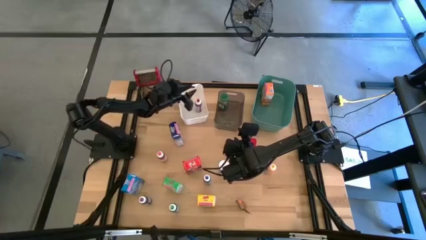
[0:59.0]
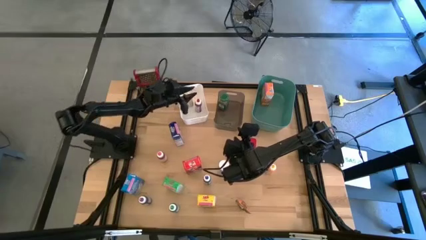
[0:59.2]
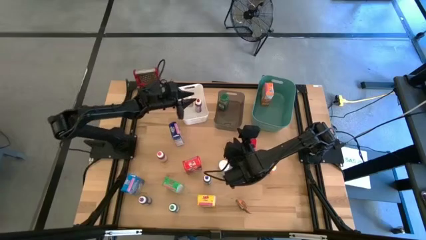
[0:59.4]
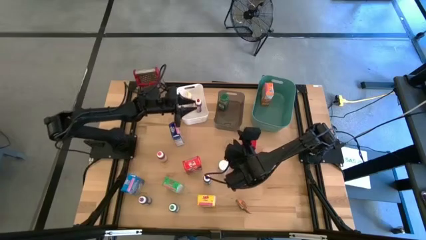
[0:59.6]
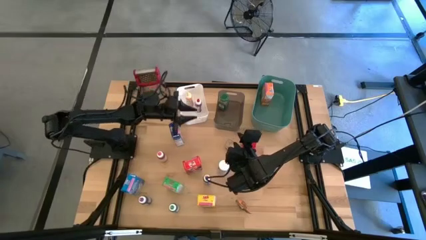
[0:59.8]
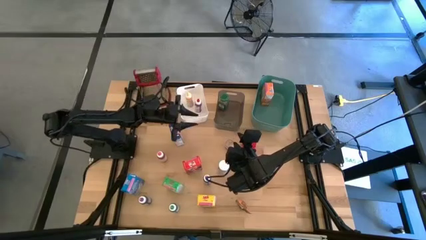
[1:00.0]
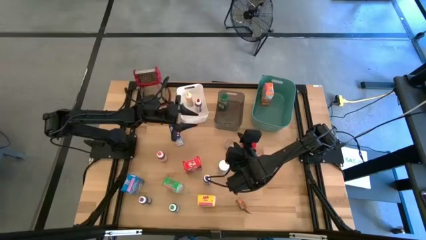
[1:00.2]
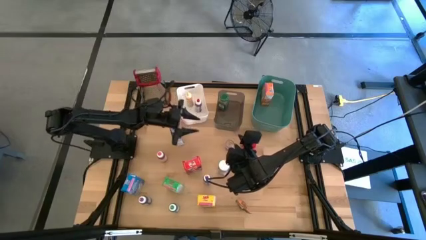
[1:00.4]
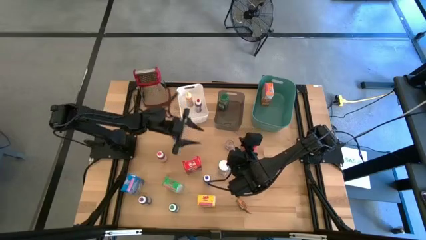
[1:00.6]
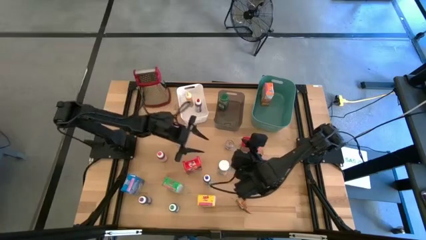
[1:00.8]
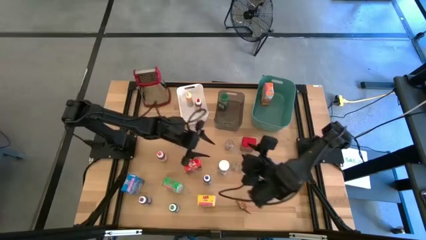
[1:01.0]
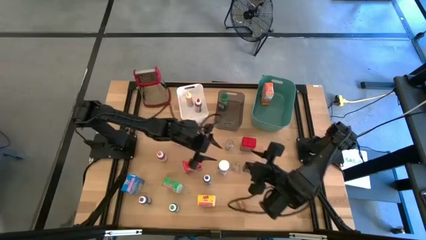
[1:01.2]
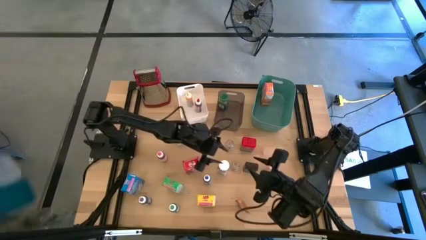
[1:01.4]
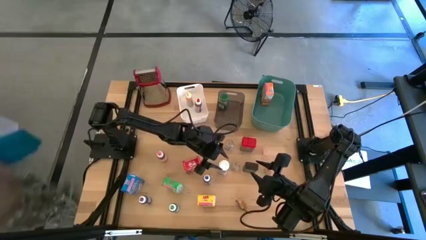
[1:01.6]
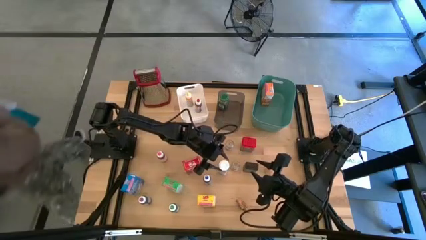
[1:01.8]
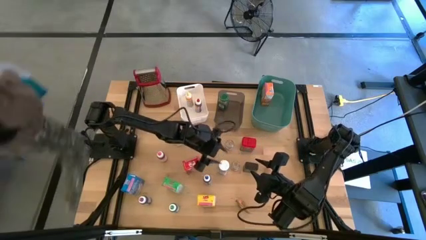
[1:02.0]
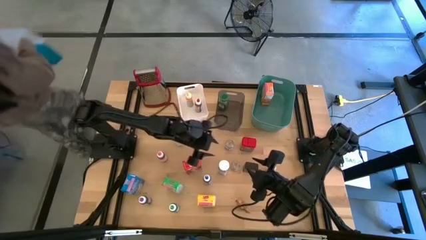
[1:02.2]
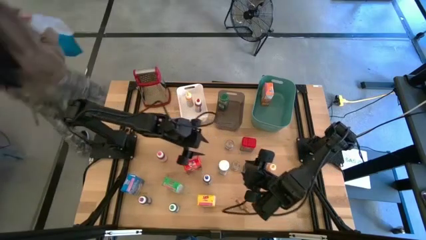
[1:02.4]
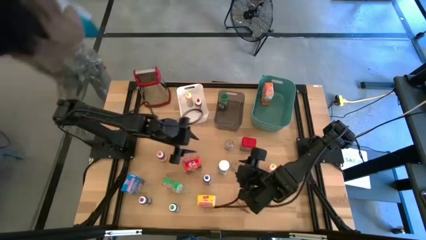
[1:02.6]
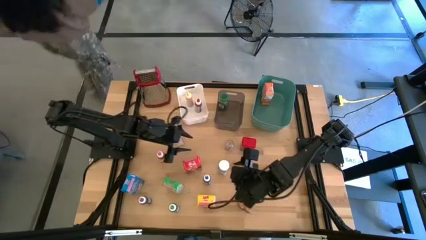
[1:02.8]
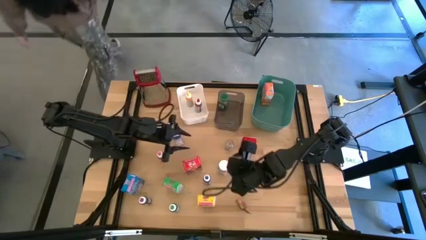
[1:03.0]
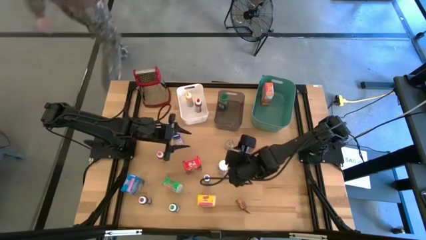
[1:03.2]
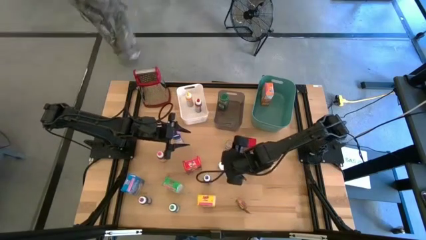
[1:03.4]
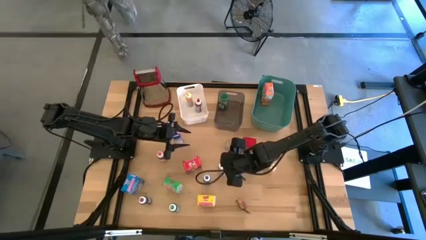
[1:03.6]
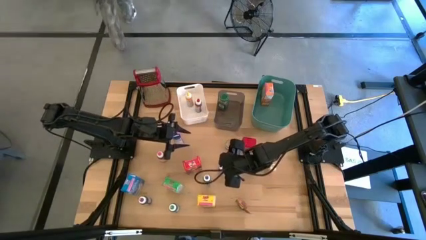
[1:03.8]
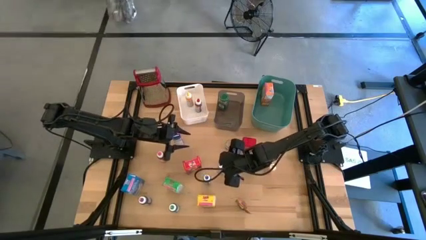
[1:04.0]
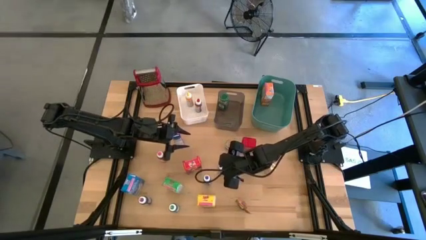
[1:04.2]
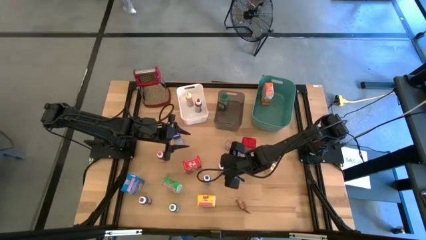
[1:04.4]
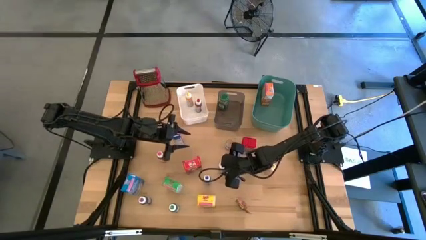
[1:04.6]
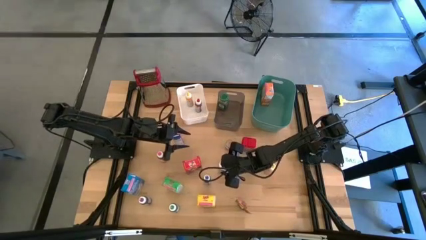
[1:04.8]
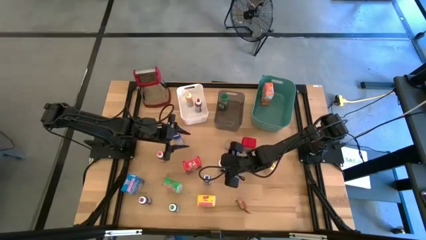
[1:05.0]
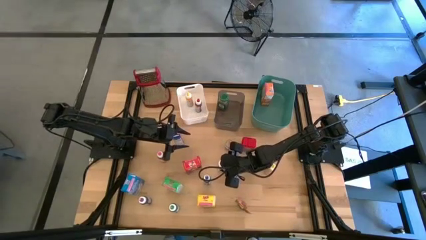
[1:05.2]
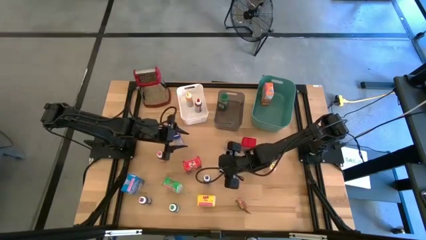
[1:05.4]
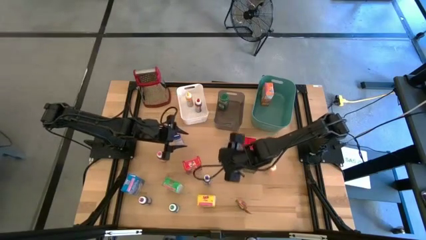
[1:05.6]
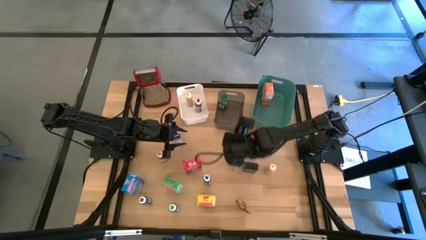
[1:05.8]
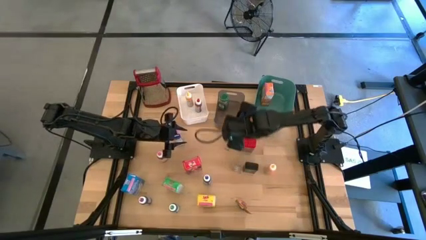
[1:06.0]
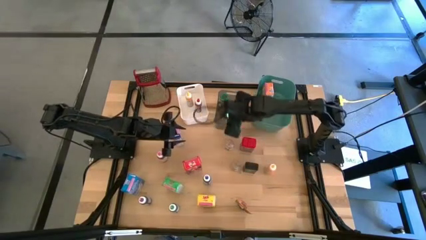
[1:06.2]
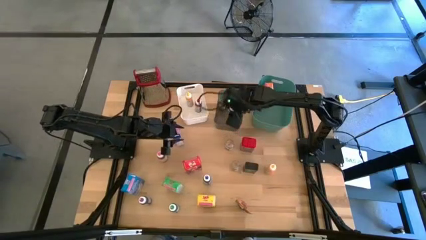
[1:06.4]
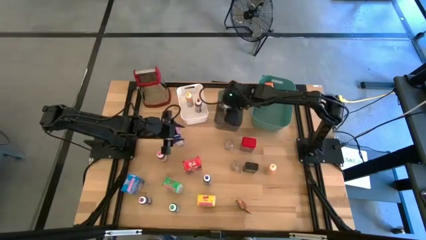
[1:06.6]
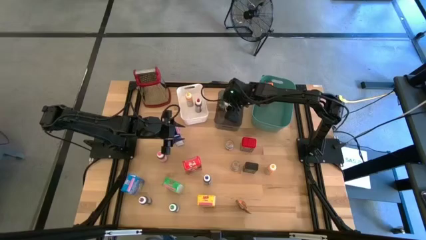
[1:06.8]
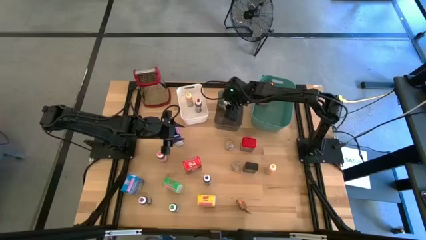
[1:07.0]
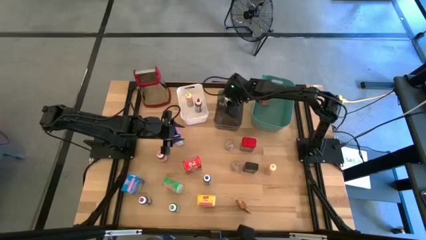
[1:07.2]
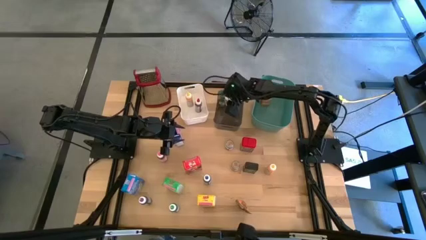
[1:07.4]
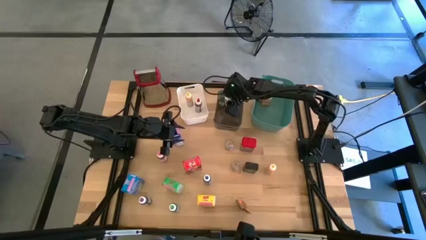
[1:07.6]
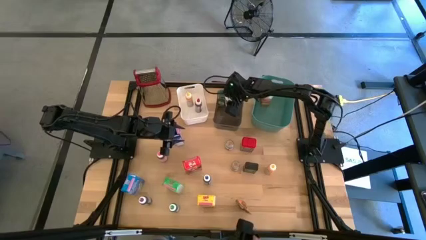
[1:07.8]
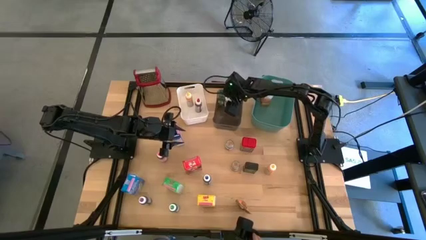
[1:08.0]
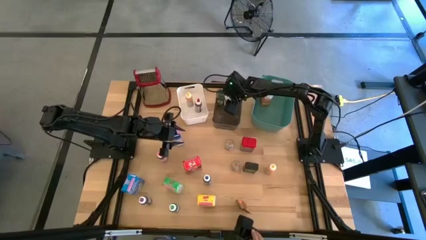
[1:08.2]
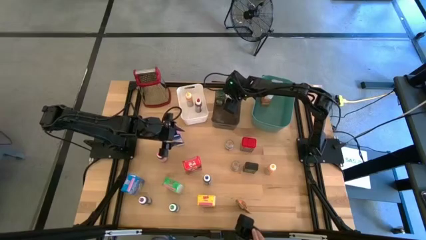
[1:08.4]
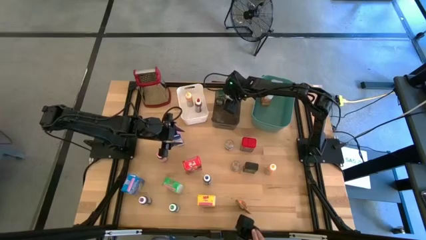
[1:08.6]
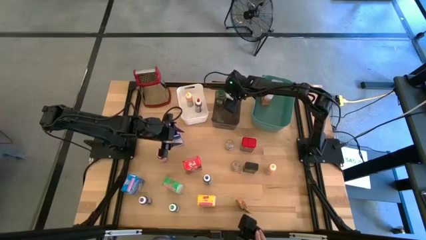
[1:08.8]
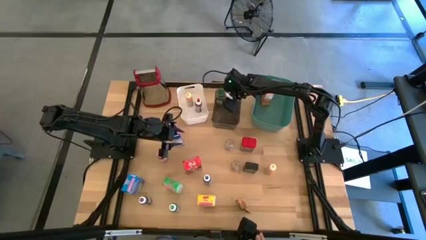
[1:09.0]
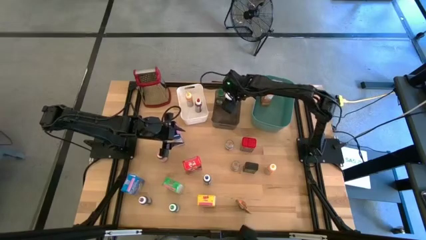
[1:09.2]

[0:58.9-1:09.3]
Task: Pick & Place Kitchen Items
Put the white spice bottle into the black bin

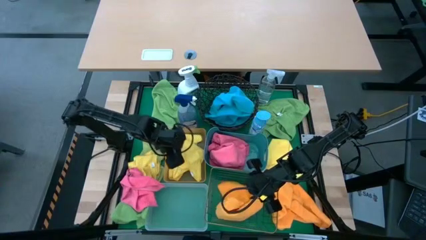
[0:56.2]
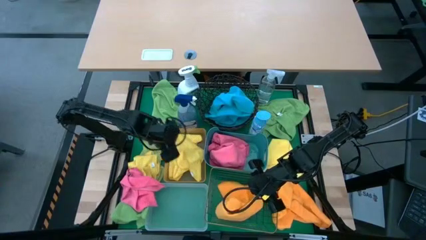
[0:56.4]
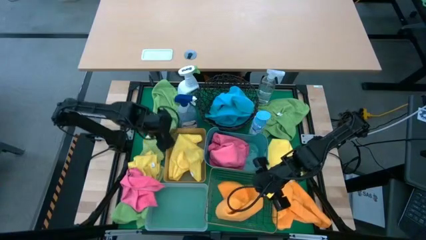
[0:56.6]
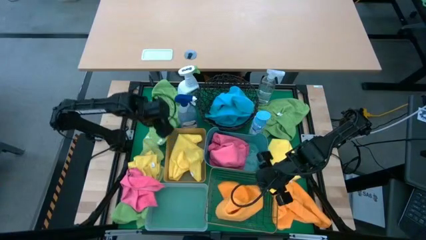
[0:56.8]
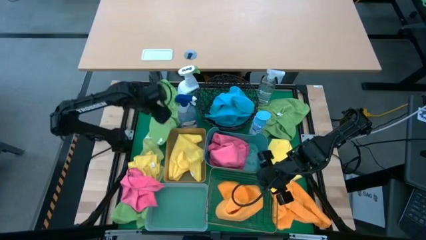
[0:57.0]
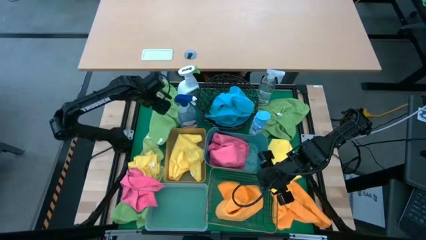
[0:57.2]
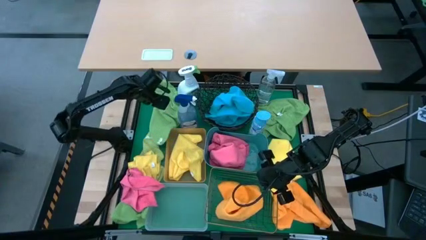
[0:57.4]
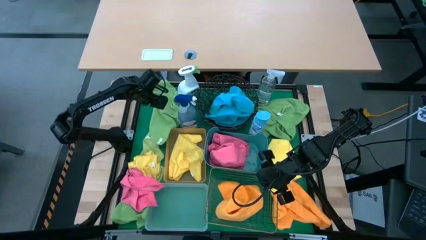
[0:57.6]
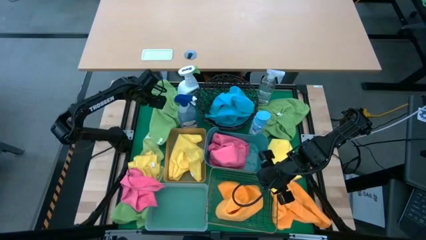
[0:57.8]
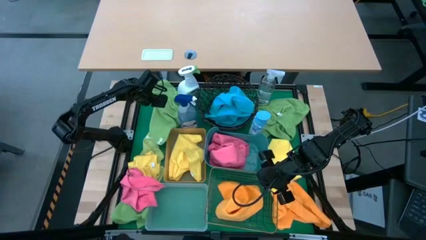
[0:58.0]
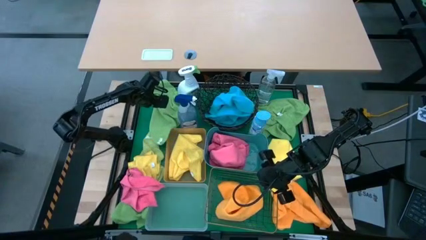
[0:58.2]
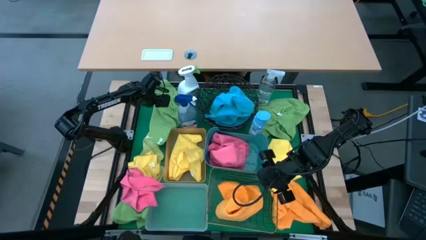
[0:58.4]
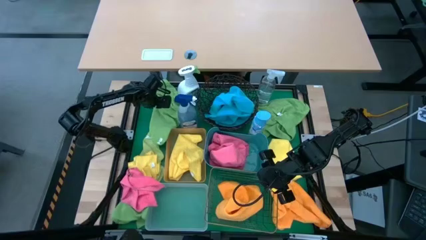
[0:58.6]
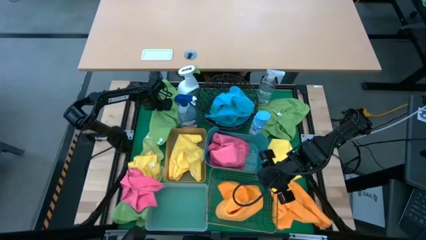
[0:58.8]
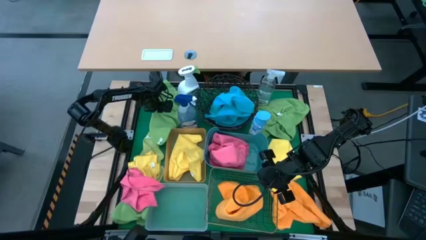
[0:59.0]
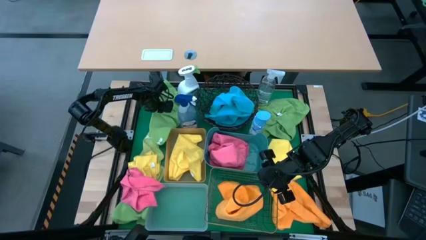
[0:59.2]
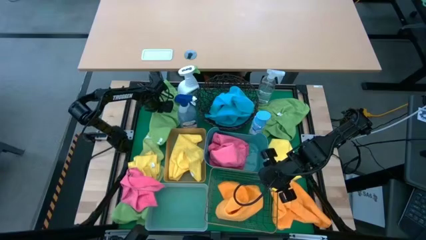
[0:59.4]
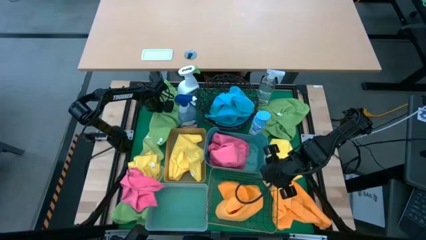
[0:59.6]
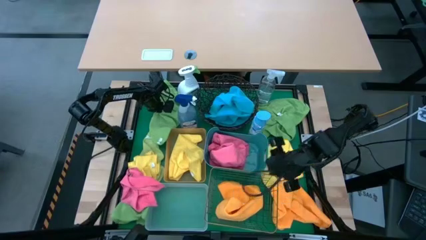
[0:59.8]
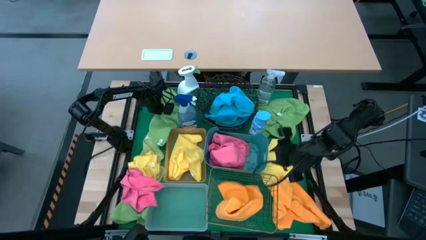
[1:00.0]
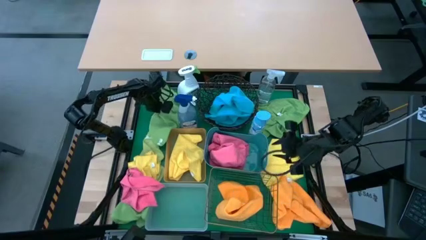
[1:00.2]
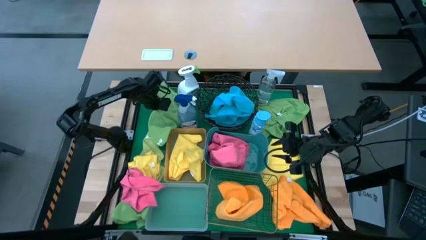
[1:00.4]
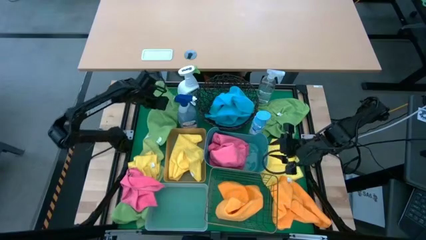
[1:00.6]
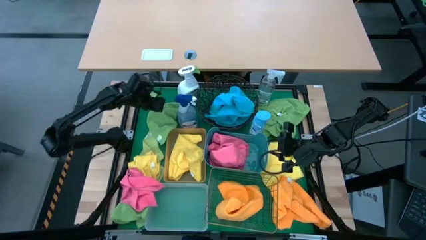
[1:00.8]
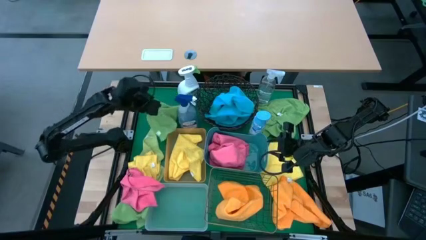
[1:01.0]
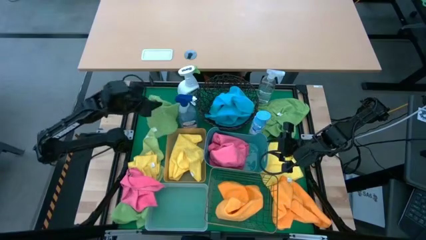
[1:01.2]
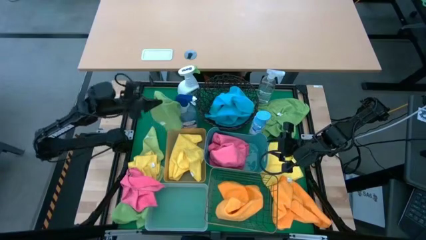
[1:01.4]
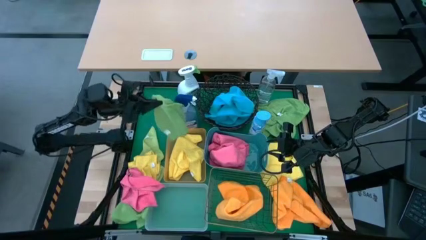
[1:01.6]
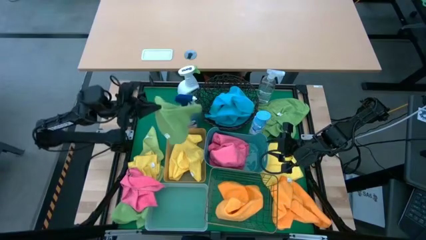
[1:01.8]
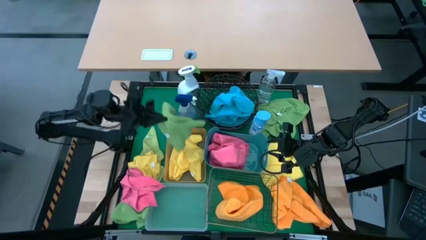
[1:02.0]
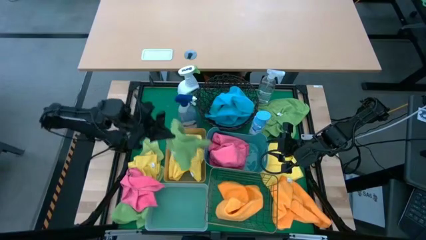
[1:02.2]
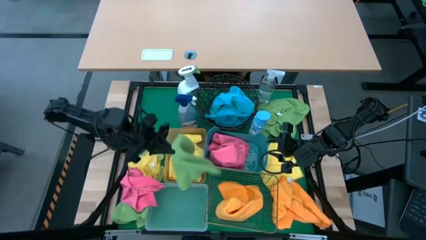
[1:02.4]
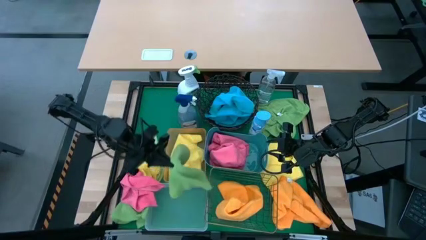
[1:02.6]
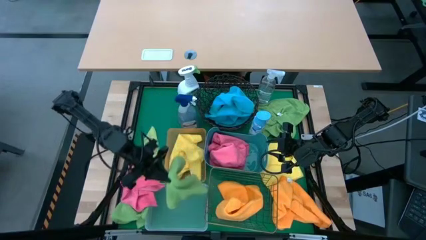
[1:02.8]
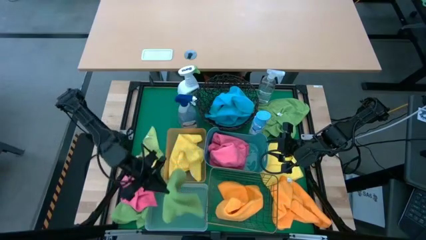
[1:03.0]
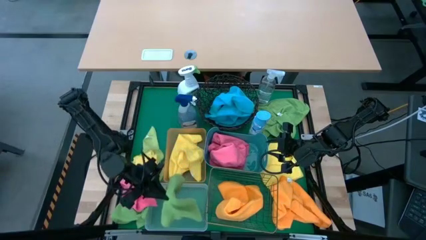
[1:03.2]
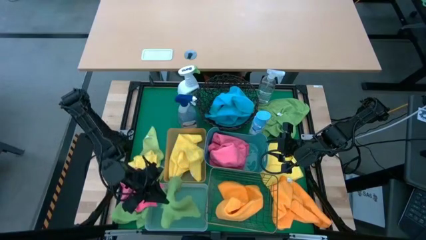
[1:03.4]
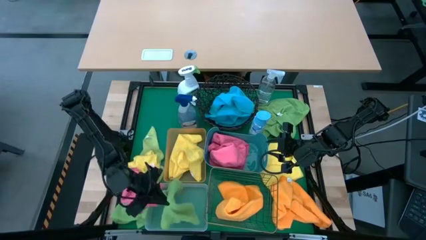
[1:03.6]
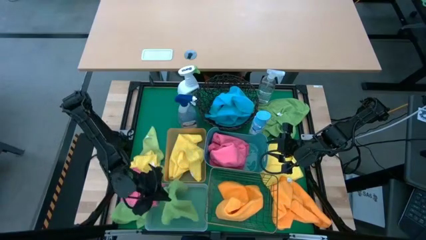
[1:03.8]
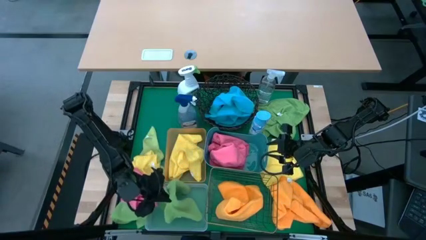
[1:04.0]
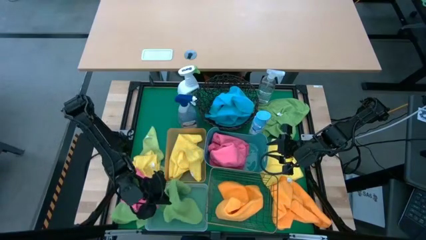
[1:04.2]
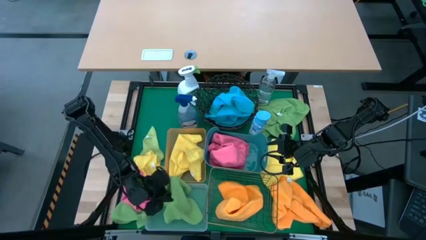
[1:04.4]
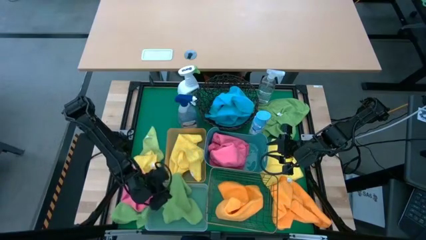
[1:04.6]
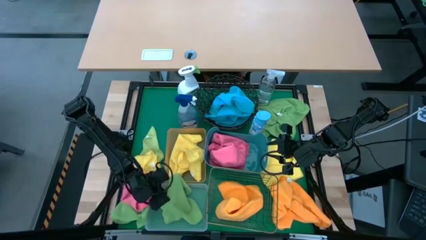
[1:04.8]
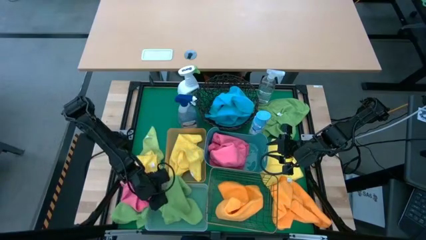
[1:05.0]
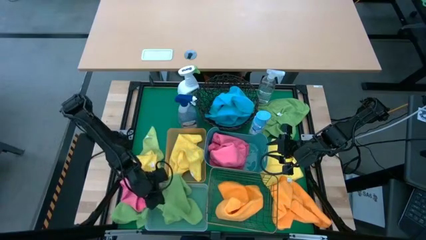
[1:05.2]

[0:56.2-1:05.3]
Task: Sort microfiber towel by color & place in baskets
Put the top left green towel into the white bin
